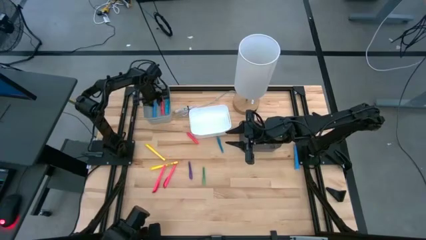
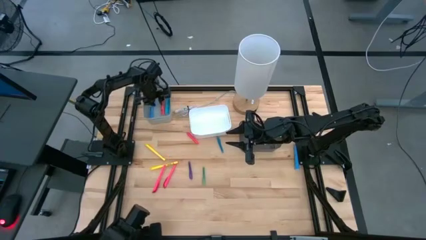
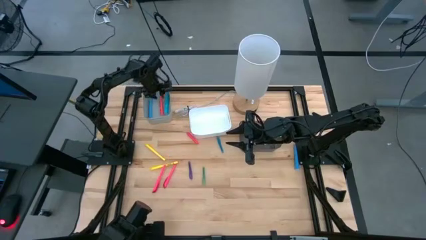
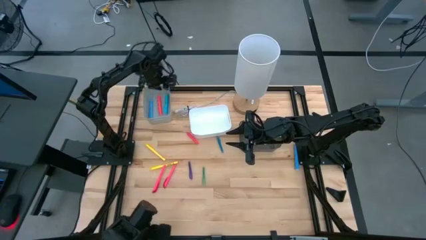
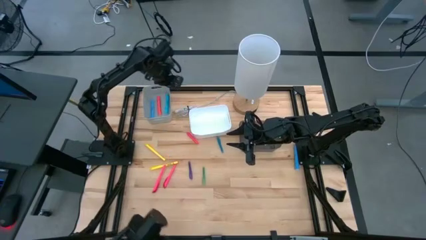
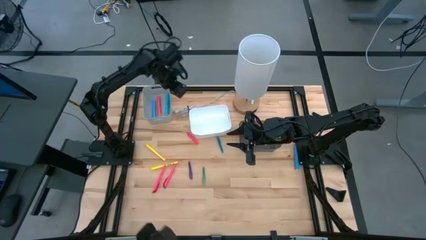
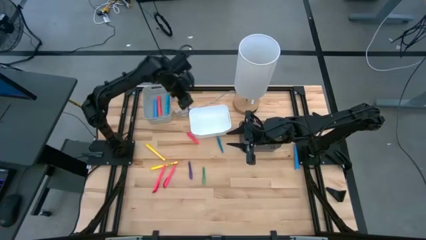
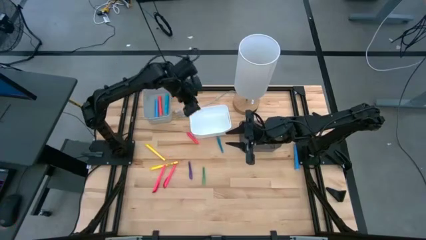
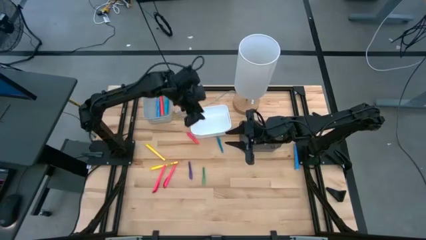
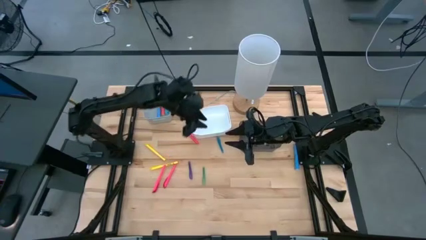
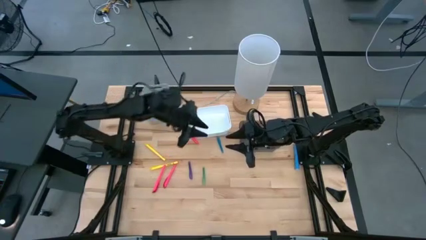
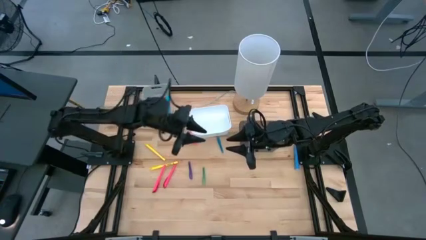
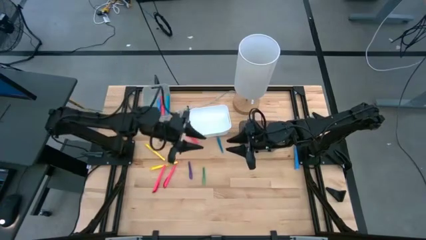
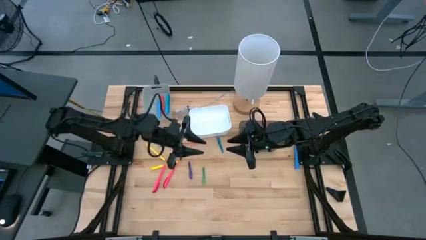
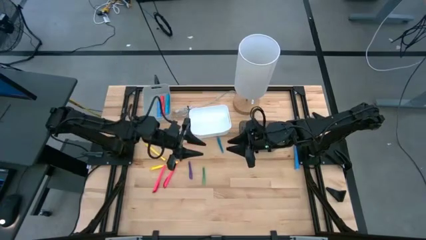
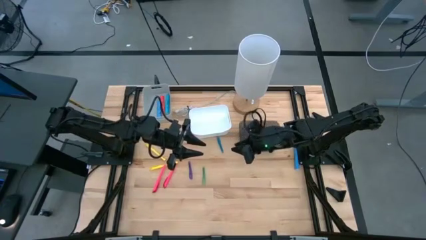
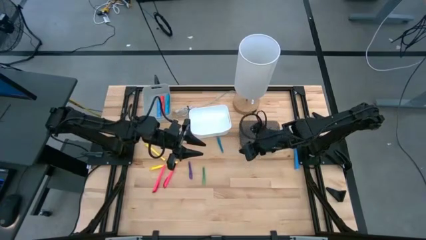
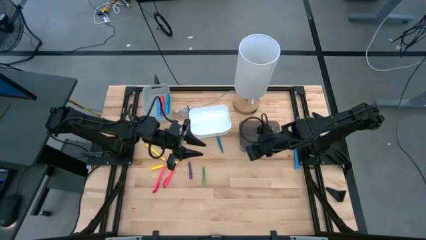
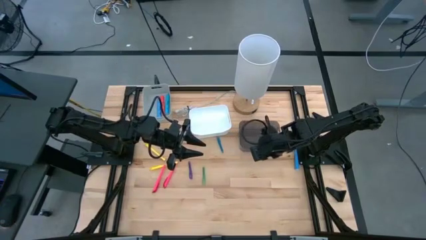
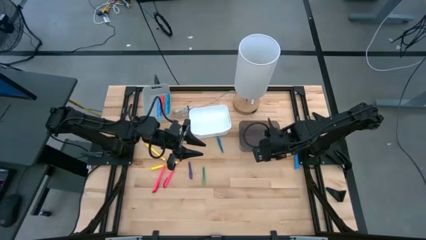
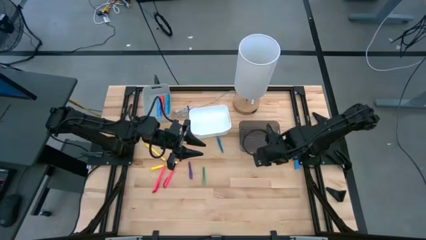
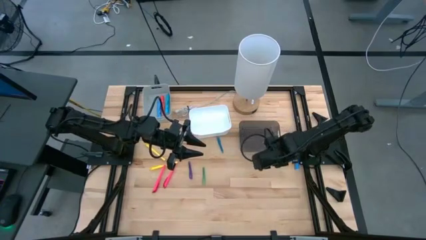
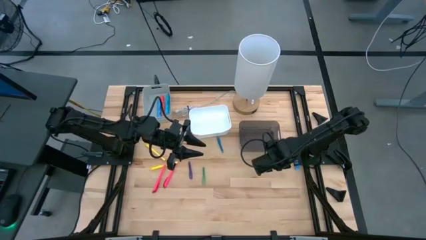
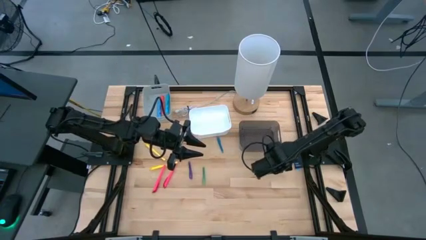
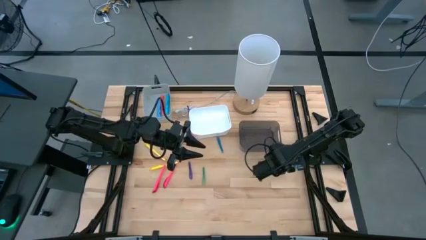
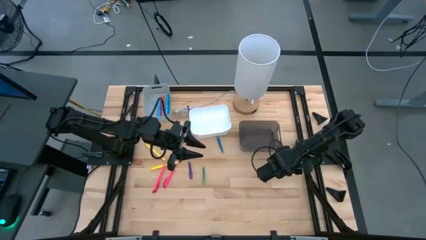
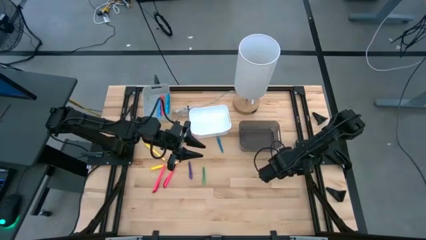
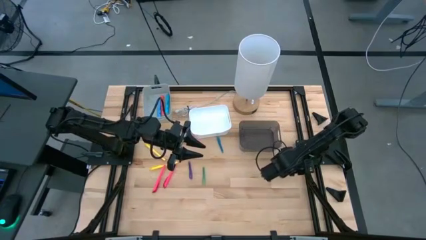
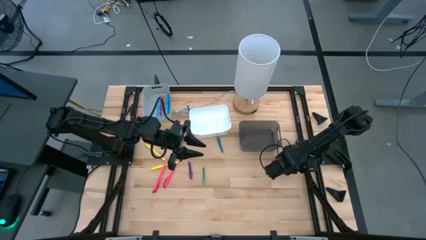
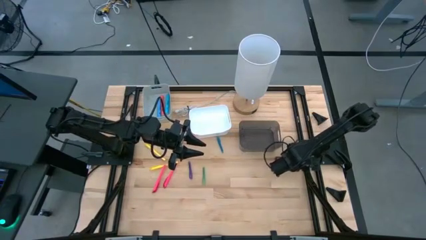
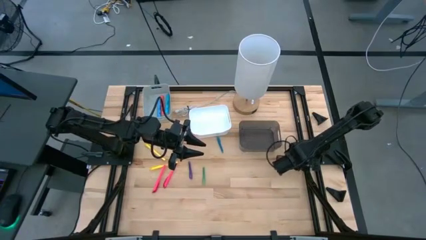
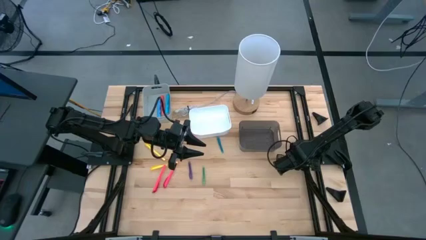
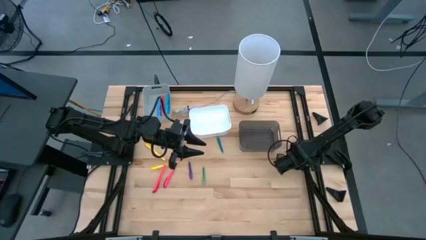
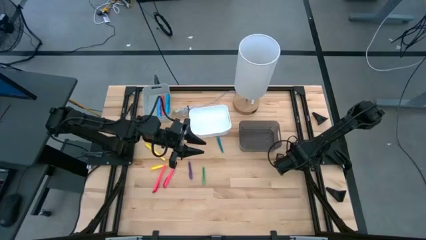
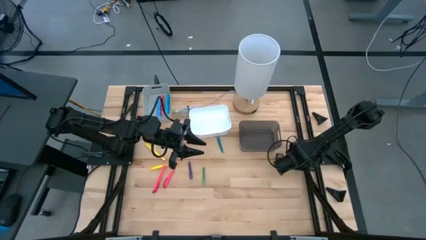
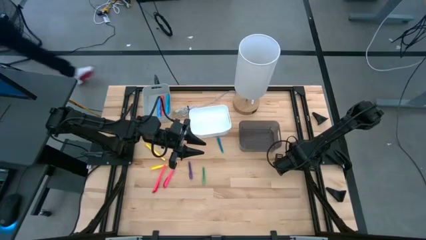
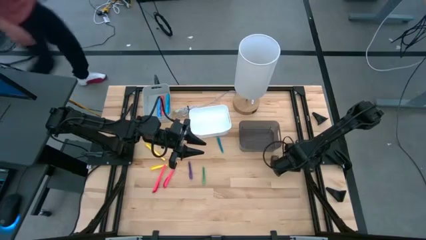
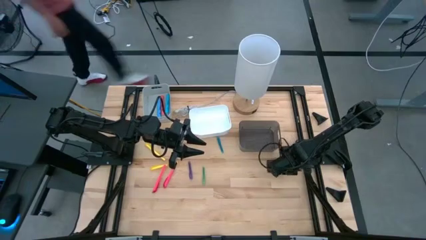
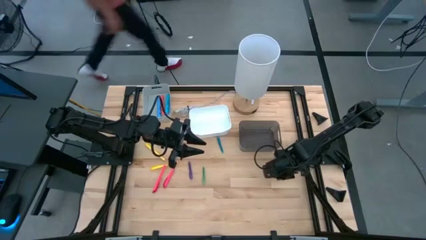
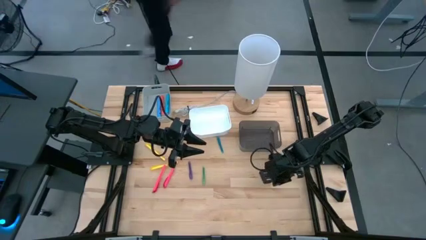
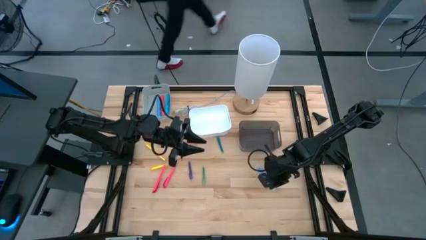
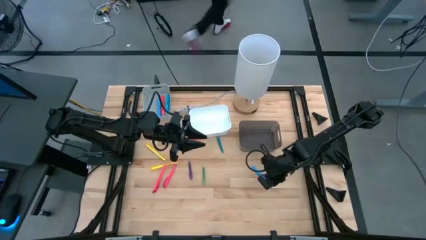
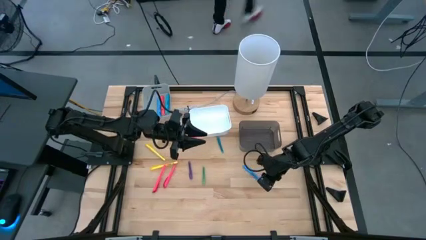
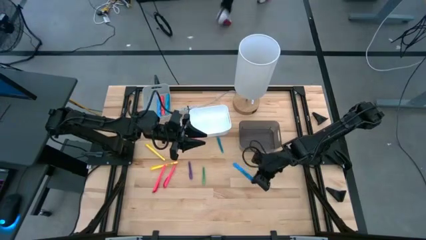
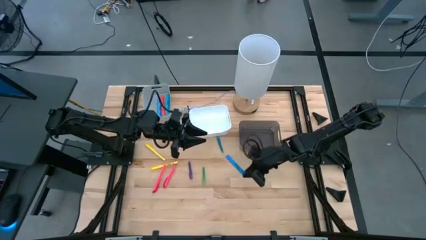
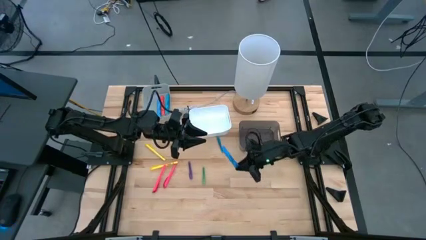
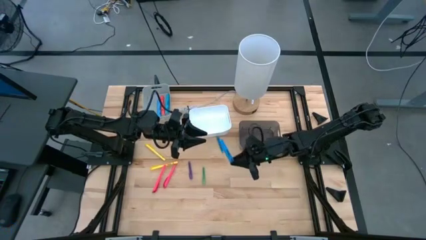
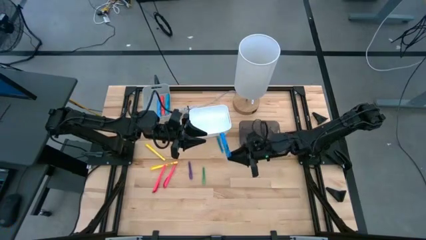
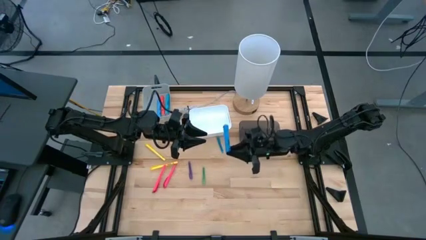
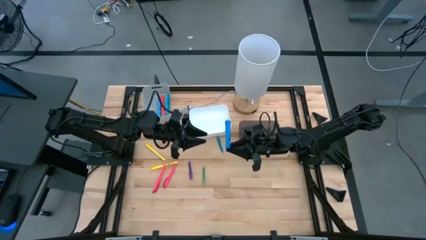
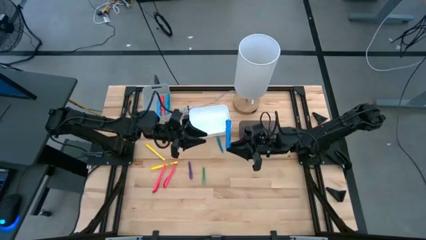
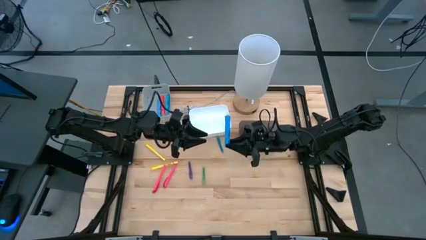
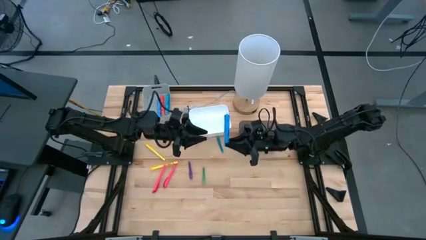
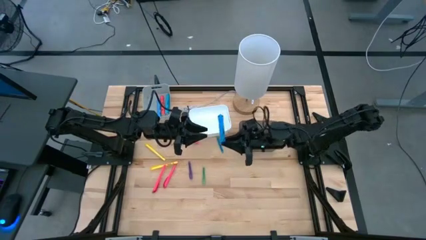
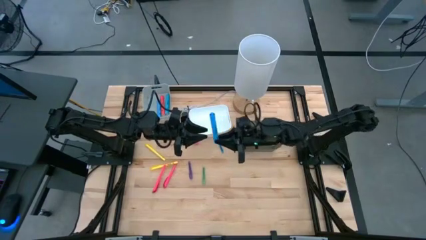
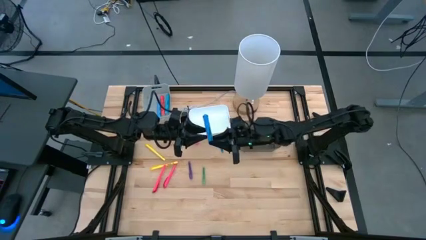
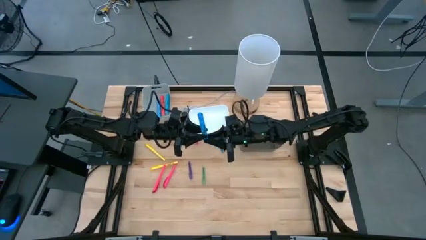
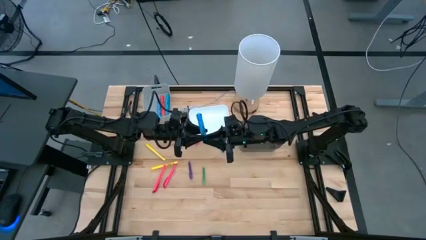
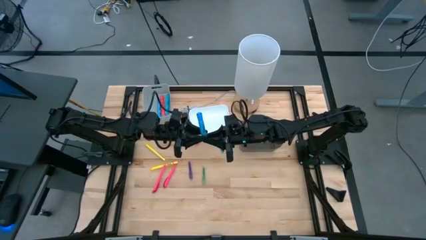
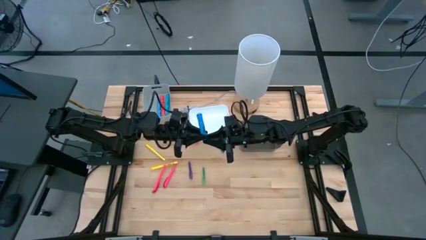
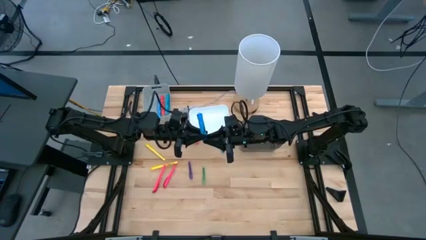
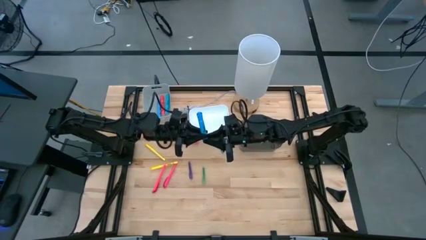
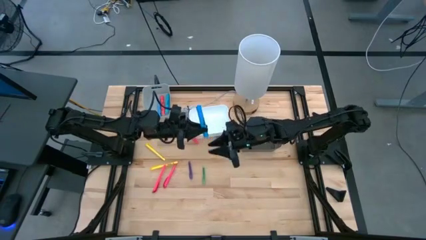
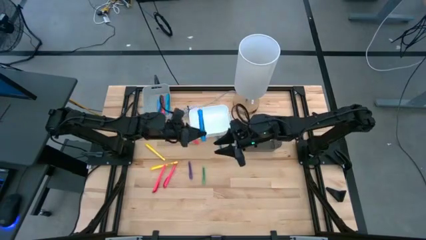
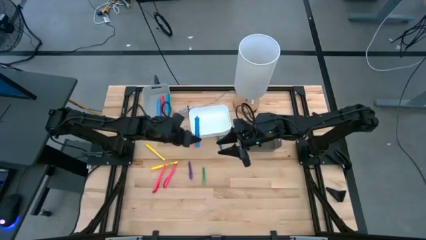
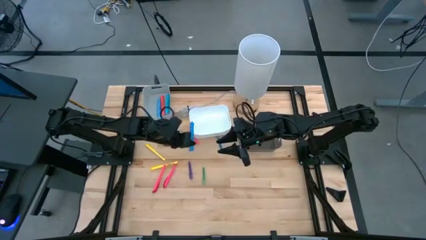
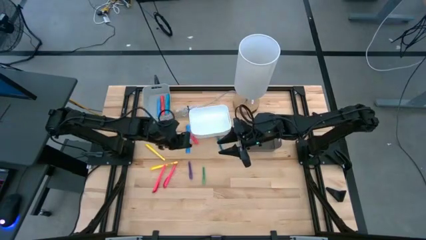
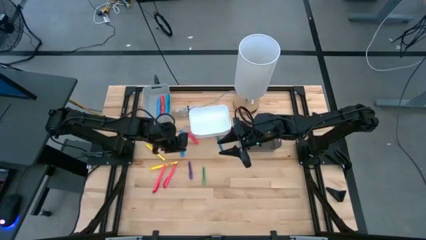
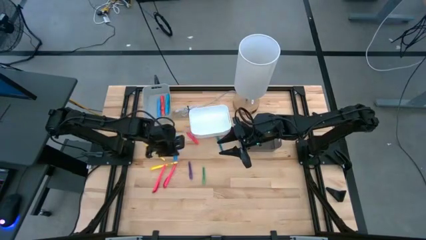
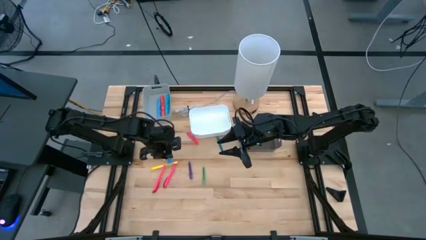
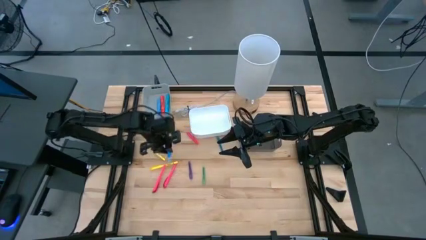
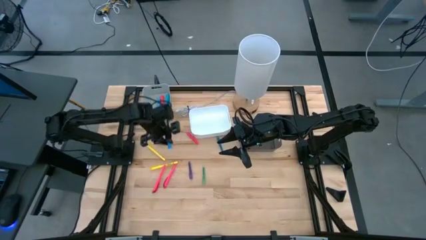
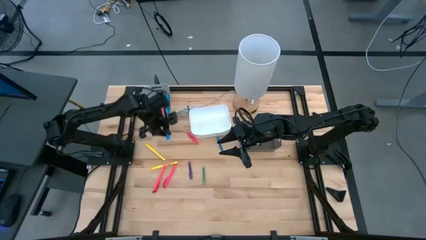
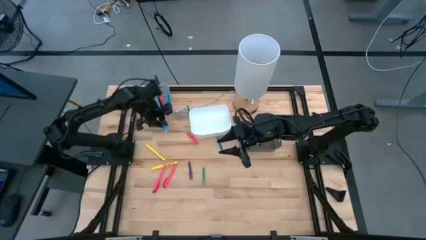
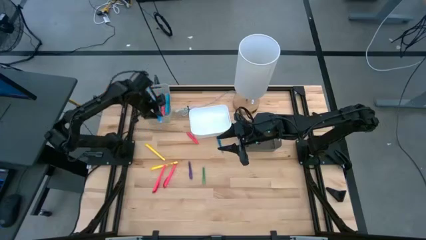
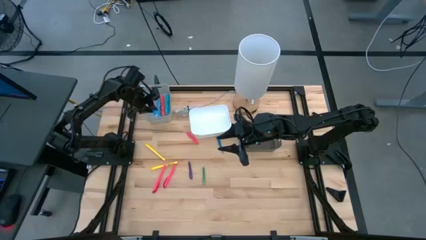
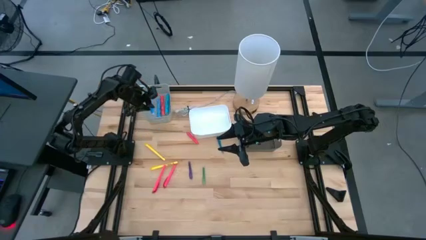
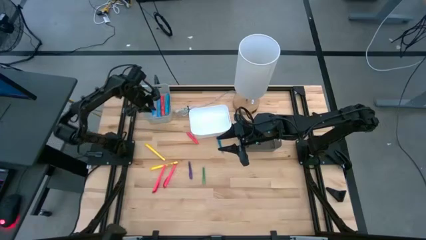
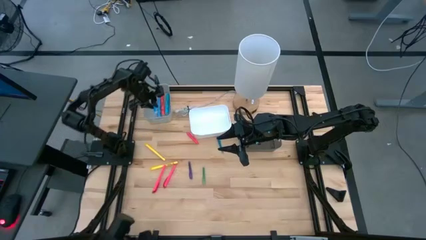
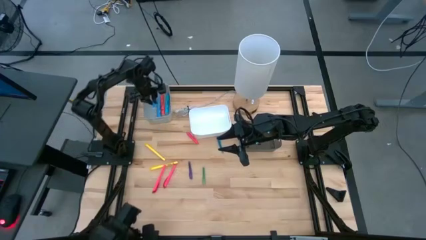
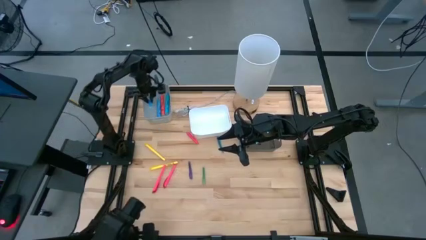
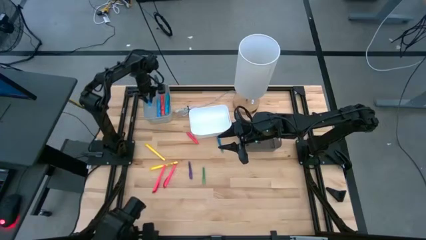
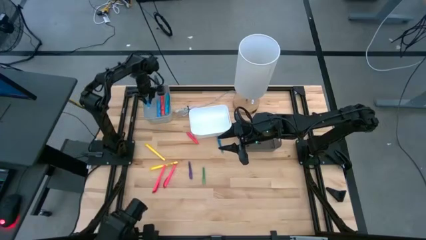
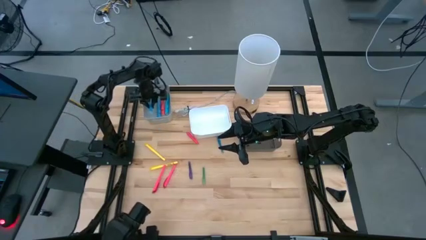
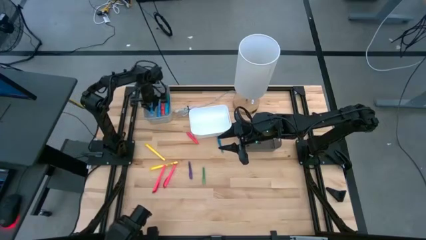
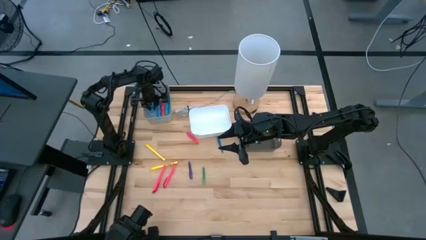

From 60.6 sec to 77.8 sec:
Task: Pick & Place Markers
Put the blue highlighter pen into the gray bin
